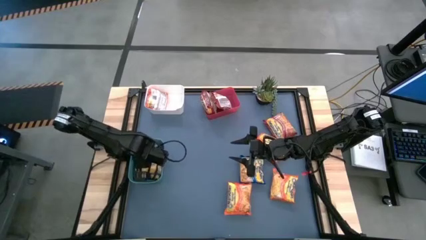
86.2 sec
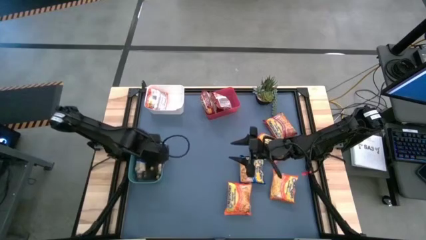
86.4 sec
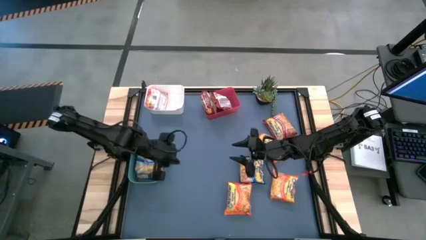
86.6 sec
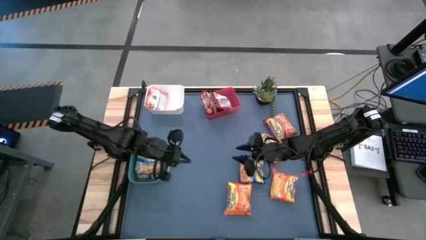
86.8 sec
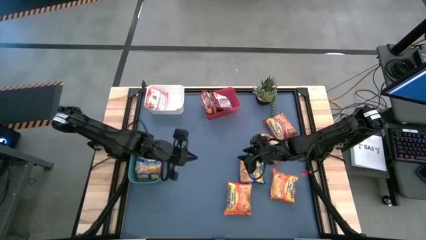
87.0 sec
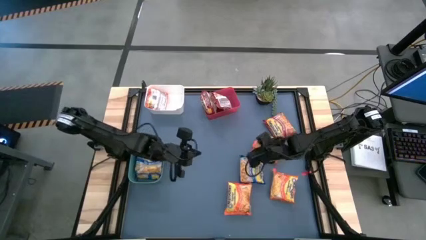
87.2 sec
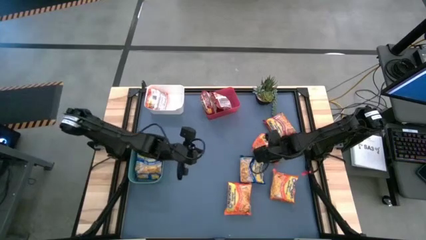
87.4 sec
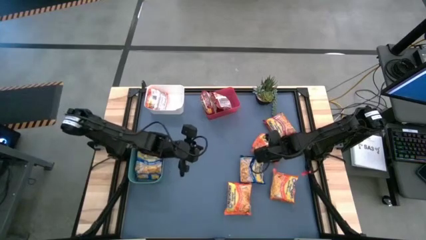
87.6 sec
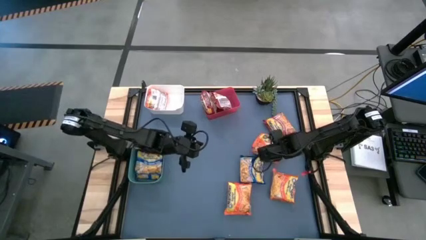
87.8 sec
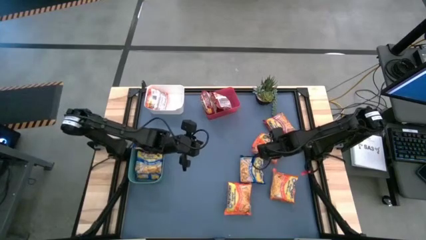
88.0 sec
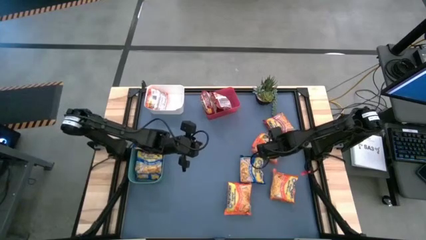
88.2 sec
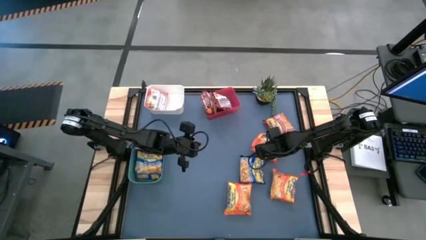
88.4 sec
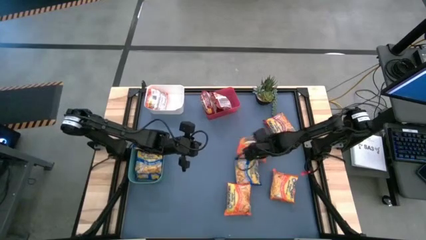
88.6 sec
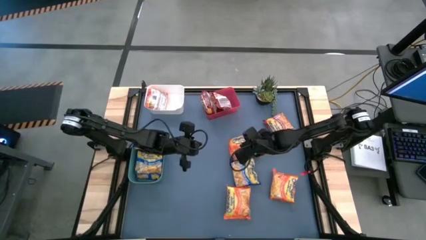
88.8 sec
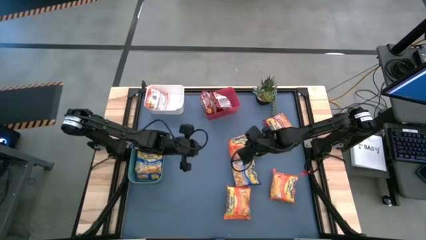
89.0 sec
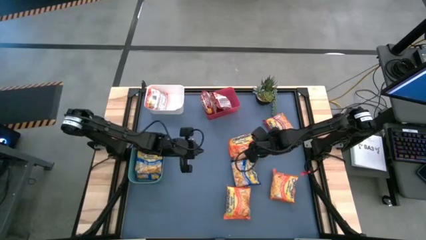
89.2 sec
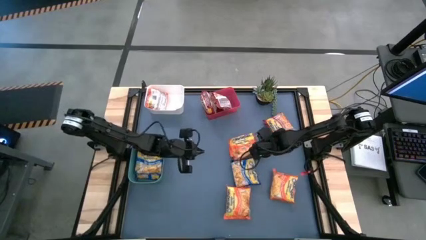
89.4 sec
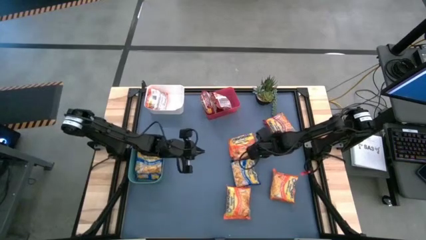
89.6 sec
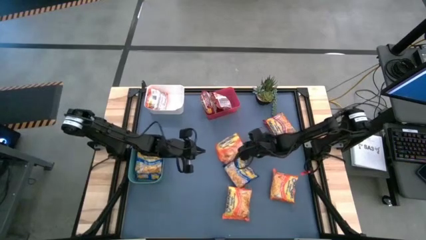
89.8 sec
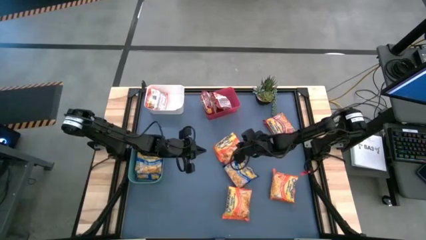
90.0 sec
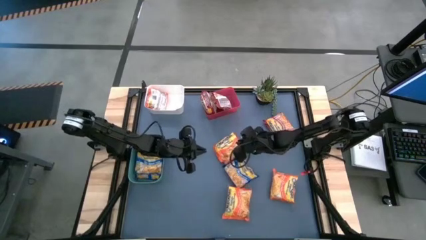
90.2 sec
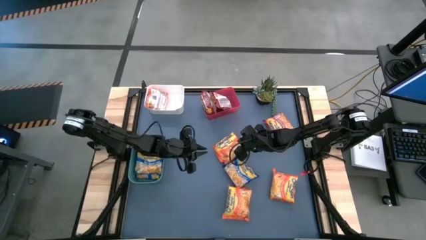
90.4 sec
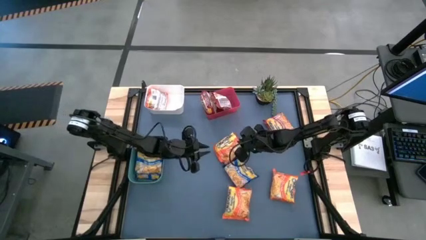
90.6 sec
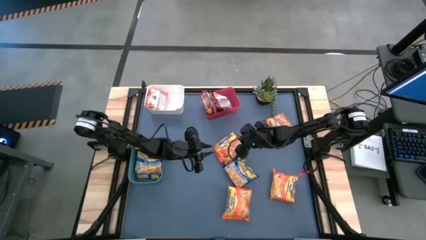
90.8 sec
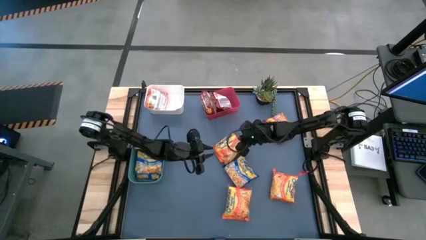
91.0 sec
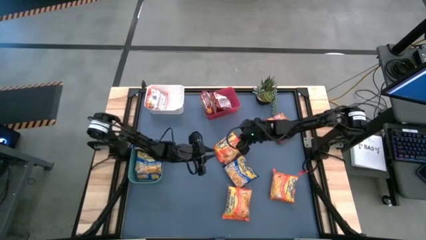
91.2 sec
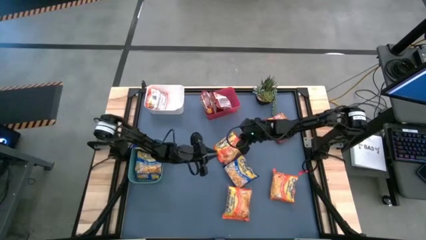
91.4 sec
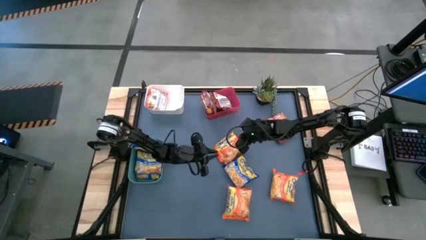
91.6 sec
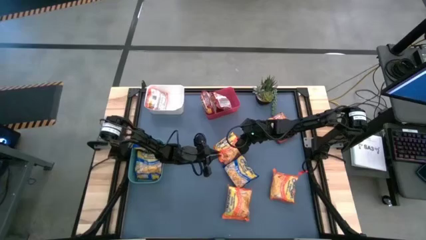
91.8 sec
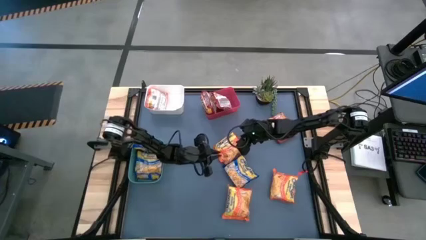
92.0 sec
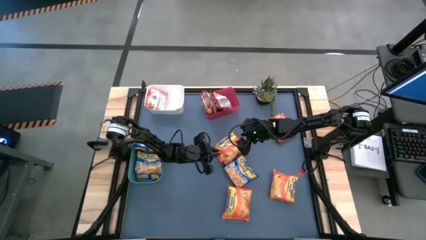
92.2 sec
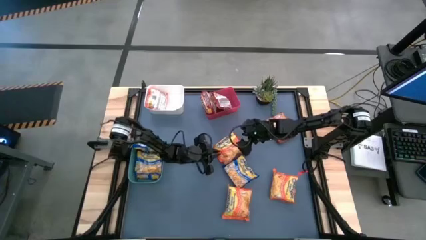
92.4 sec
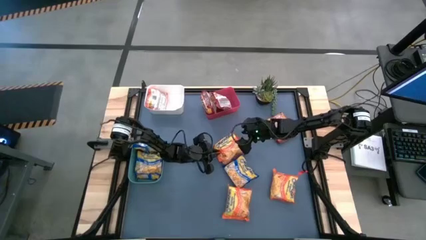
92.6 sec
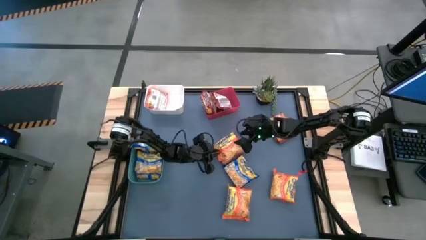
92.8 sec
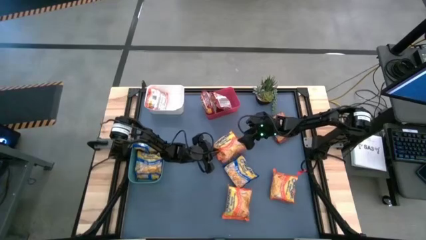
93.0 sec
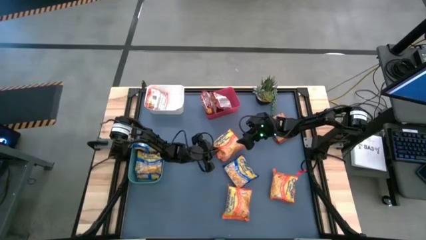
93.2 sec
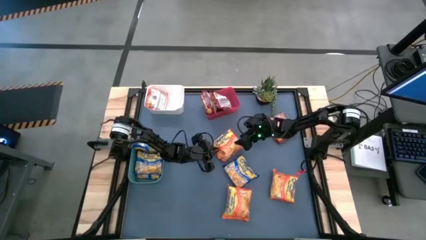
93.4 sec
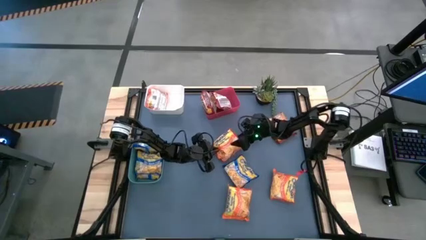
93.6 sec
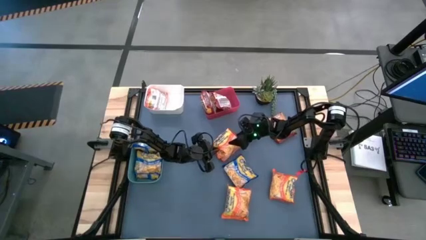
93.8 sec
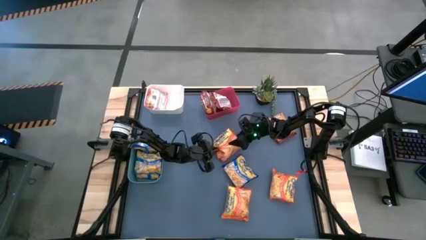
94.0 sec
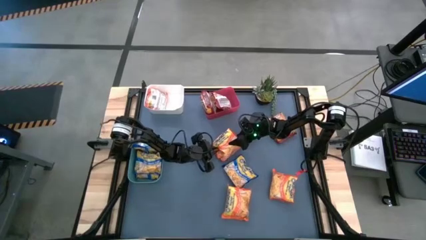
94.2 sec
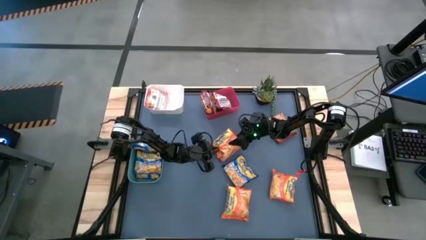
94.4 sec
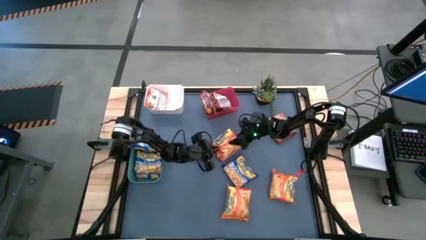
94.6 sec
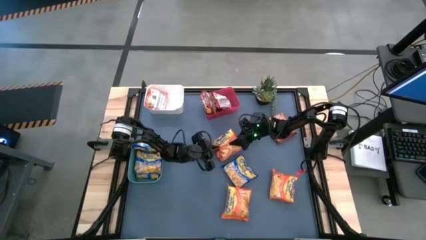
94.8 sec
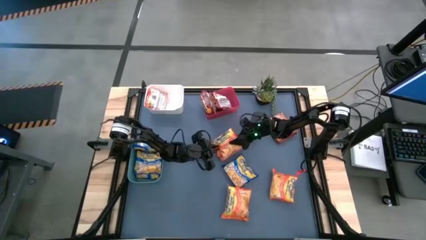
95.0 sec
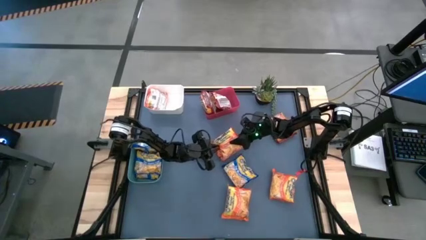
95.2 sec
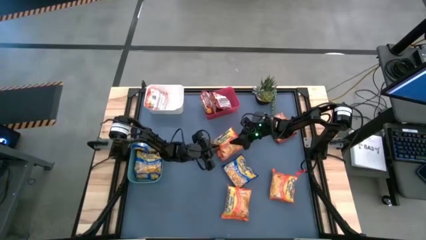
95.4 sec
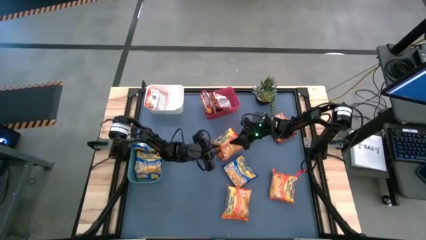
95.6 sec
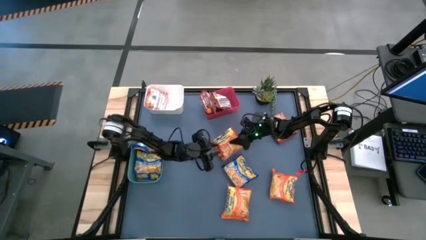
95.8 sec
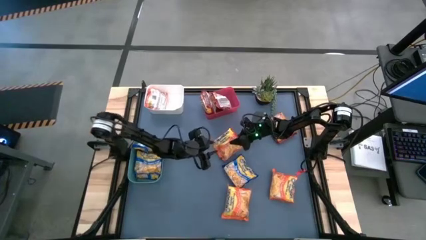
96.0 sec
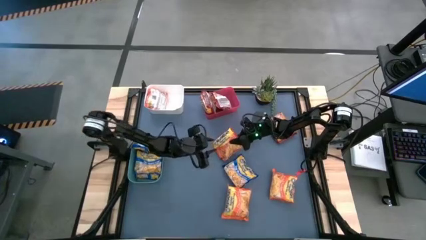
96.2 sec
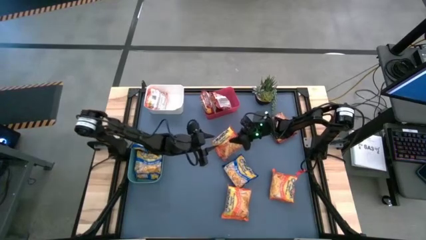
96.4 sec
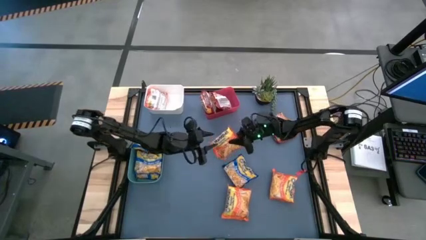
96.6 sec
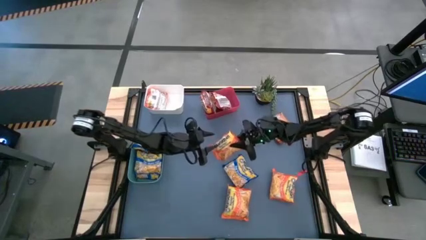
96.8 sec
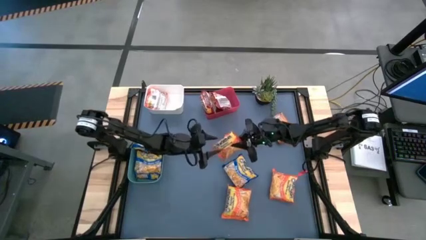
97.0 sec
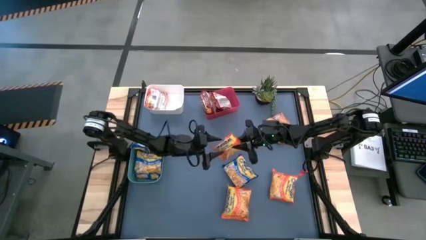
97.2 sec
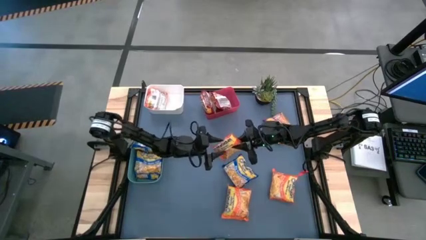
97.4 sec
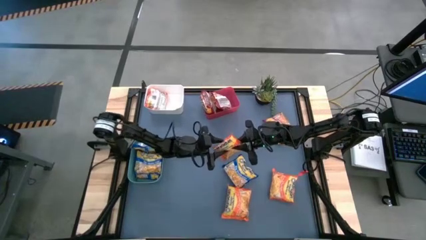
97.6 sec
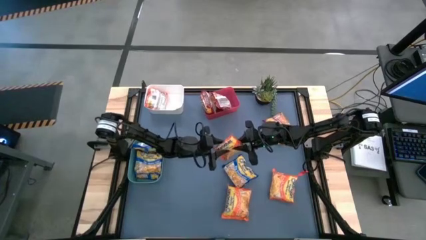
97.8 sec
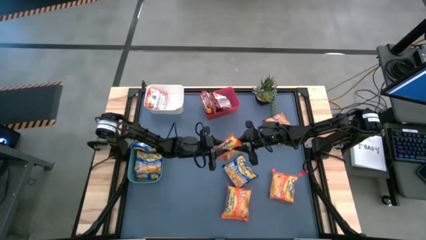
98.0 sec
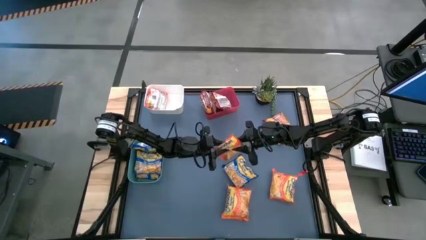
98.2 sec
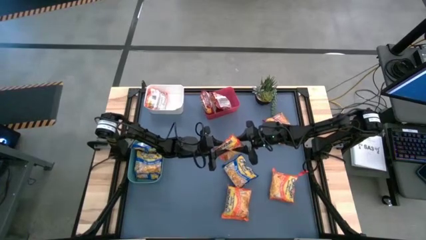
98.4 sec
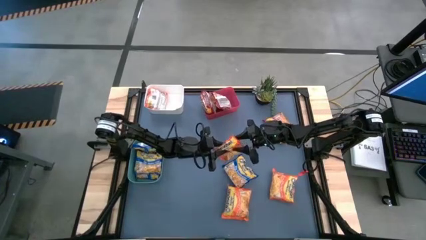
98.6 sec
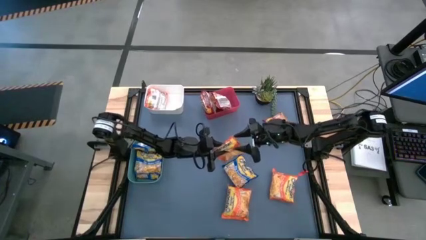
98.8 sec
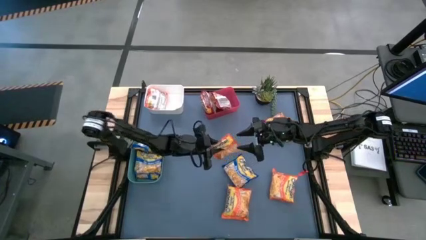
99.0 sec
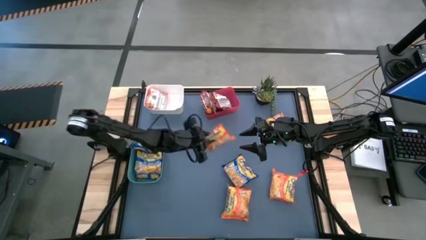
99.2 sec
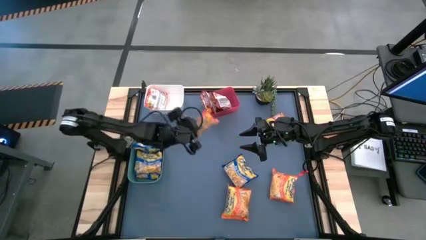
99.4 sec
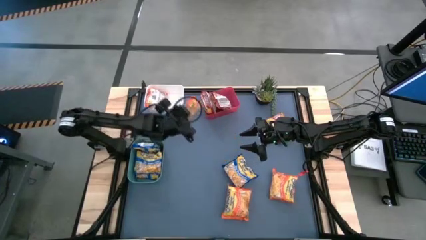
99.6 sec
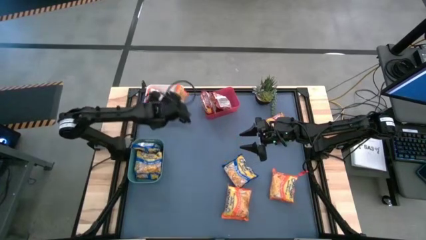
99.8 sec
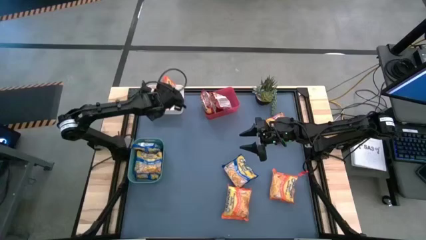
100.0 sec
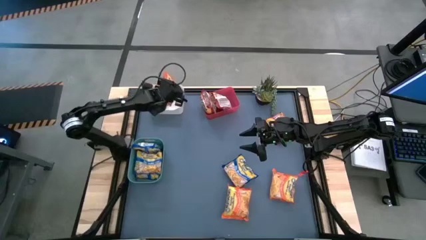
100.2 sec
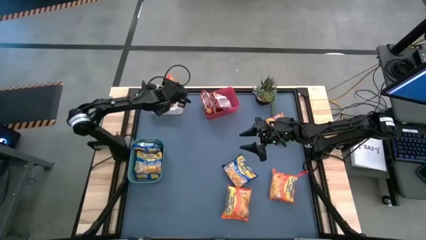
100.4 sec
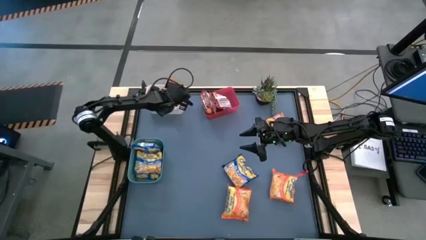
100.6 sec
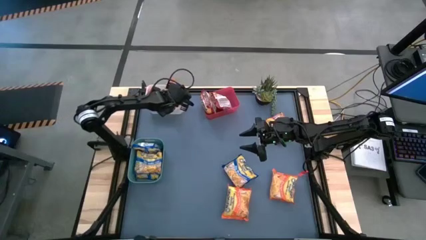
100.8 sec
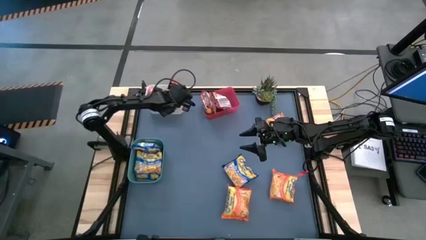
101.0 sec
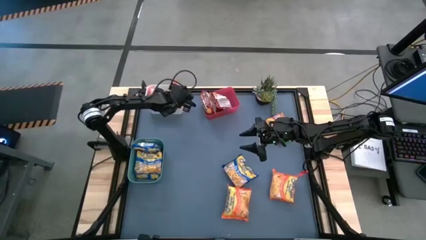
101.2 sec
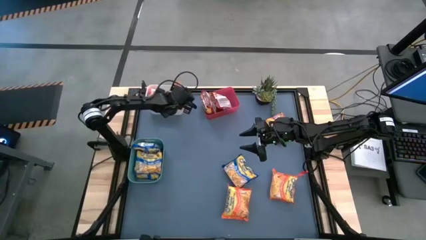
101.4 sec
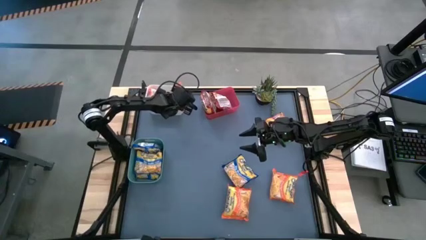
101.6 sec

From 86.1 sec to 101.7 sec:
Task: Sort Maruchan noodles
Put the orange noodle pack into the white bin
